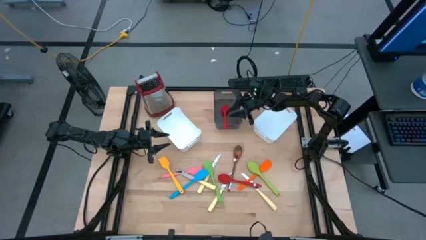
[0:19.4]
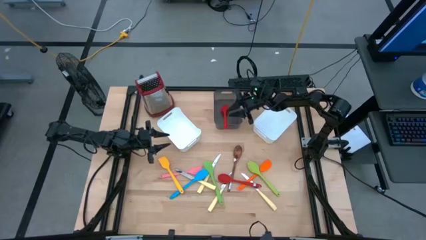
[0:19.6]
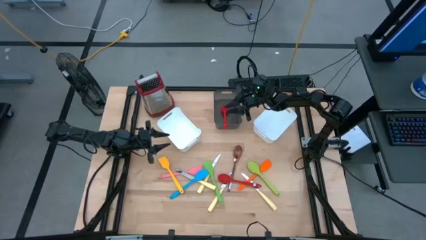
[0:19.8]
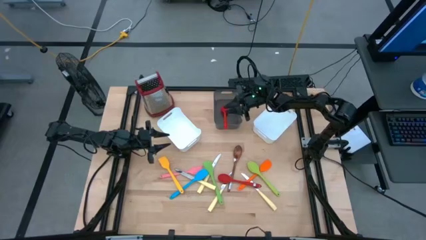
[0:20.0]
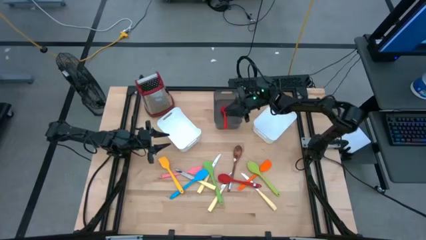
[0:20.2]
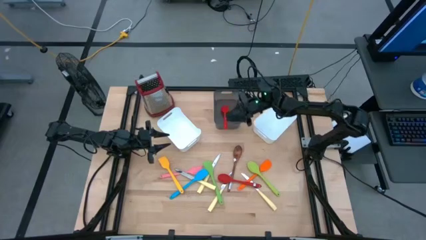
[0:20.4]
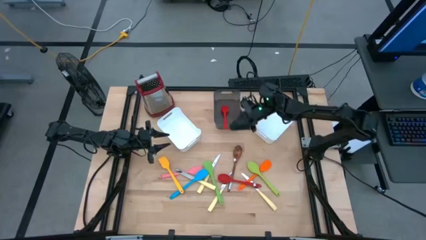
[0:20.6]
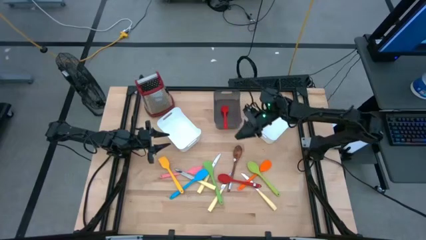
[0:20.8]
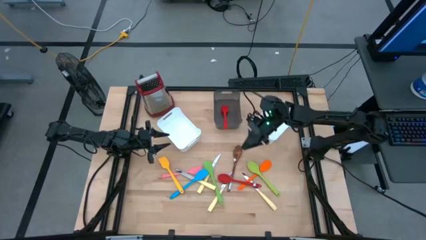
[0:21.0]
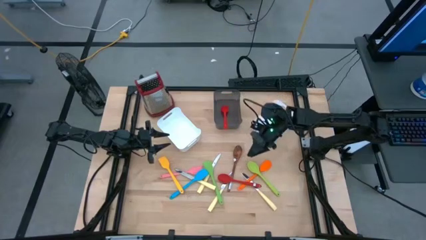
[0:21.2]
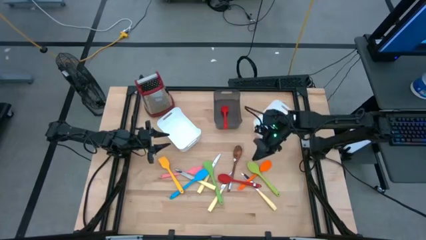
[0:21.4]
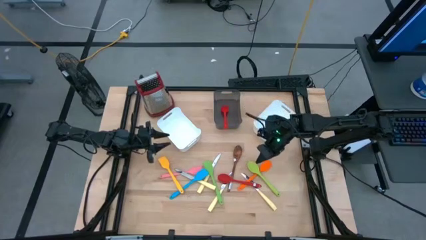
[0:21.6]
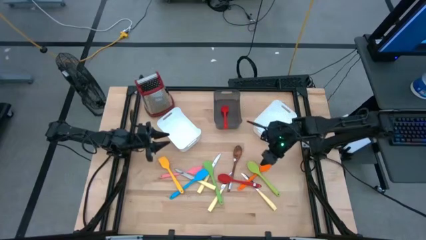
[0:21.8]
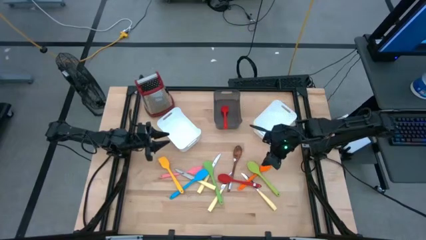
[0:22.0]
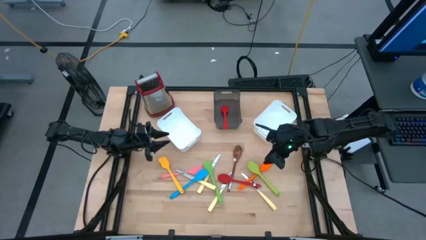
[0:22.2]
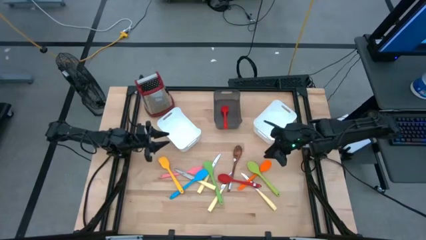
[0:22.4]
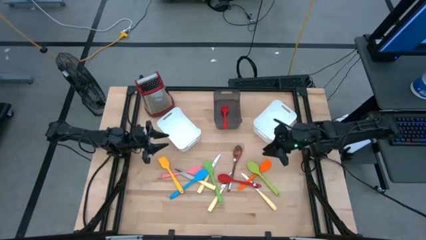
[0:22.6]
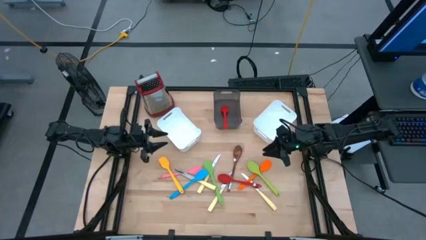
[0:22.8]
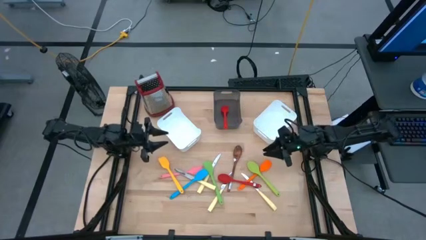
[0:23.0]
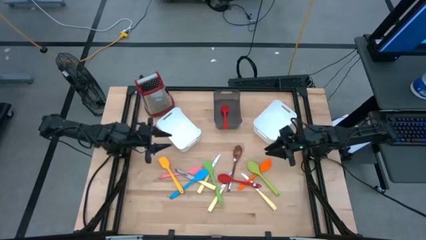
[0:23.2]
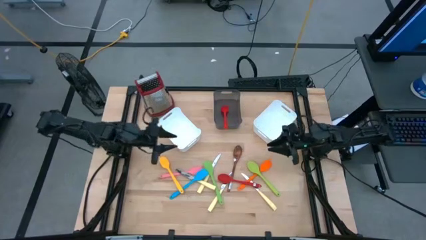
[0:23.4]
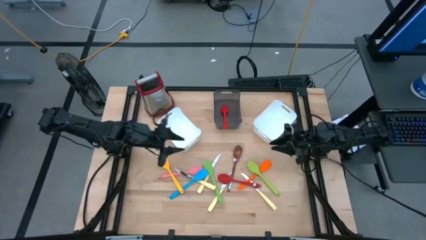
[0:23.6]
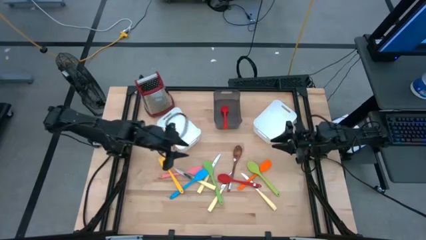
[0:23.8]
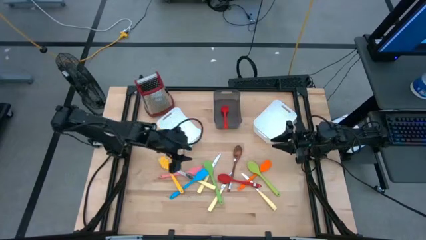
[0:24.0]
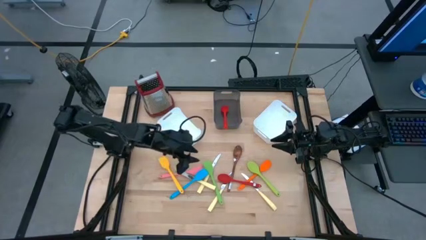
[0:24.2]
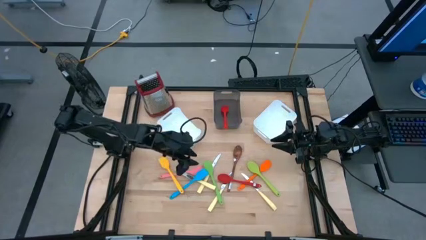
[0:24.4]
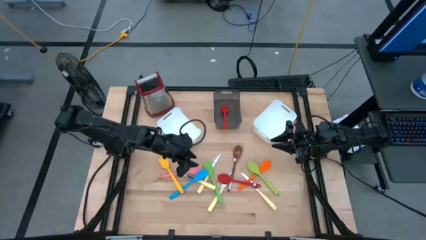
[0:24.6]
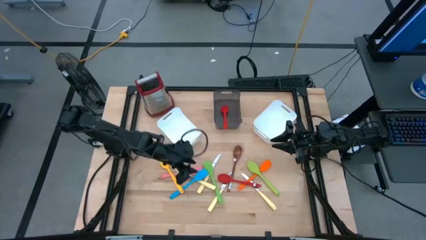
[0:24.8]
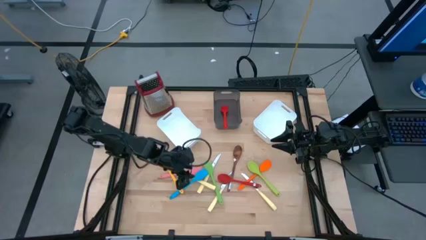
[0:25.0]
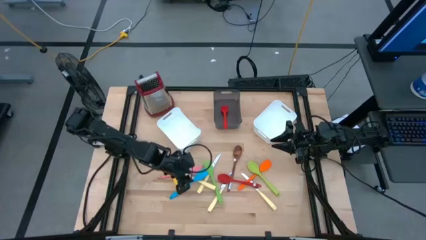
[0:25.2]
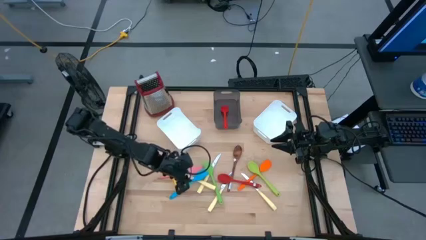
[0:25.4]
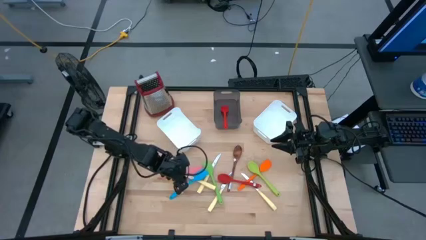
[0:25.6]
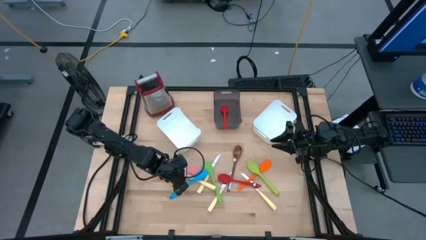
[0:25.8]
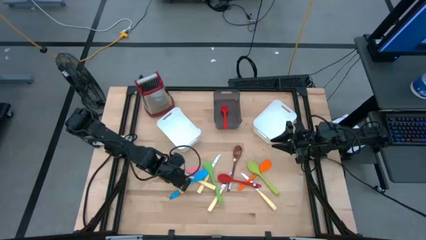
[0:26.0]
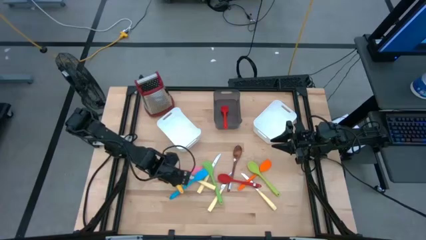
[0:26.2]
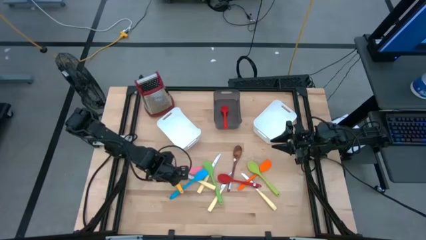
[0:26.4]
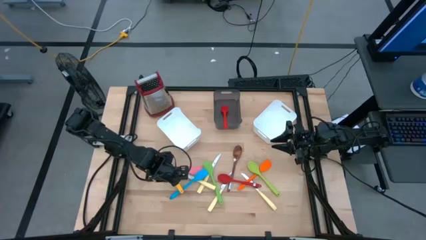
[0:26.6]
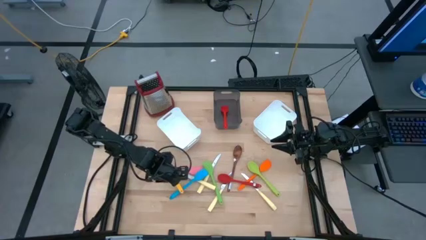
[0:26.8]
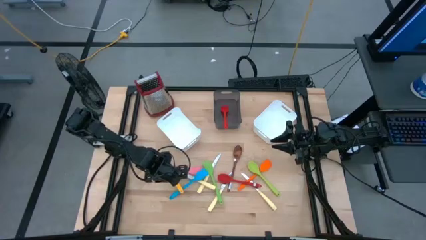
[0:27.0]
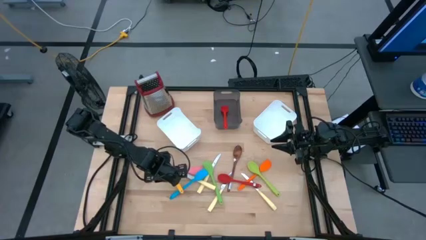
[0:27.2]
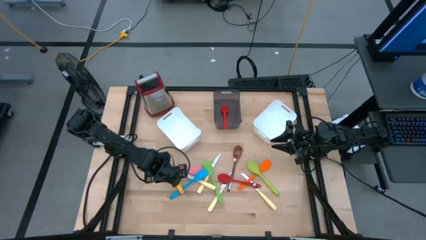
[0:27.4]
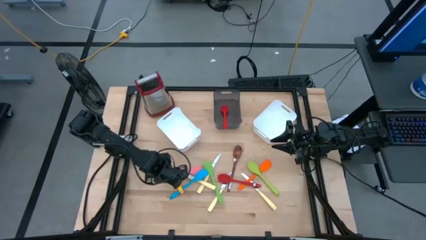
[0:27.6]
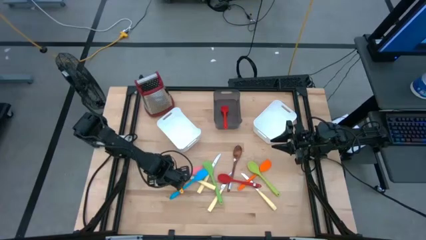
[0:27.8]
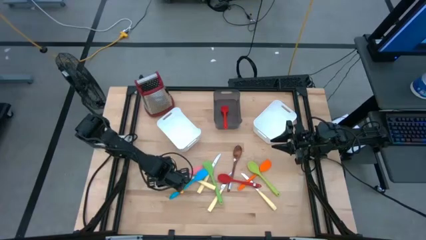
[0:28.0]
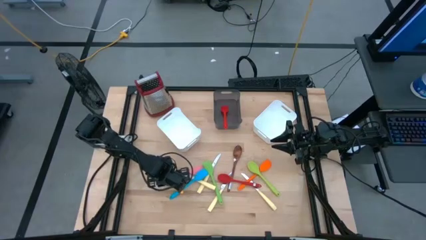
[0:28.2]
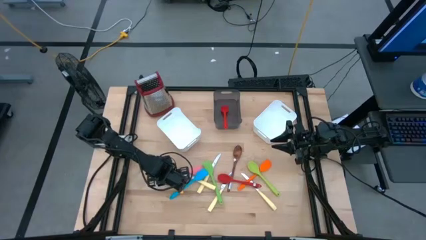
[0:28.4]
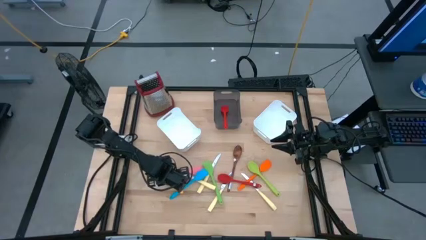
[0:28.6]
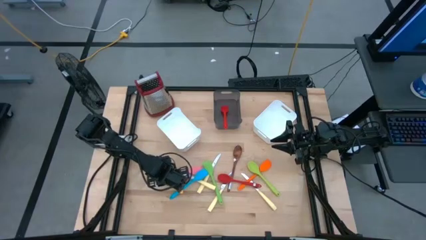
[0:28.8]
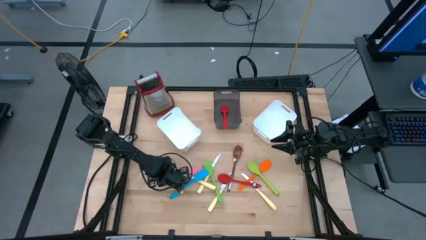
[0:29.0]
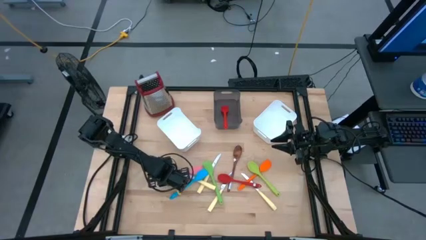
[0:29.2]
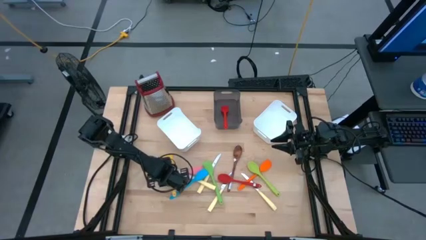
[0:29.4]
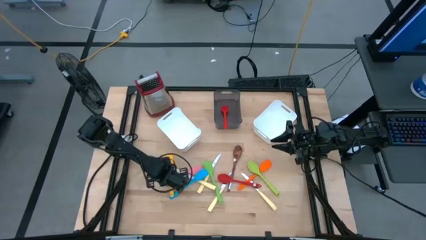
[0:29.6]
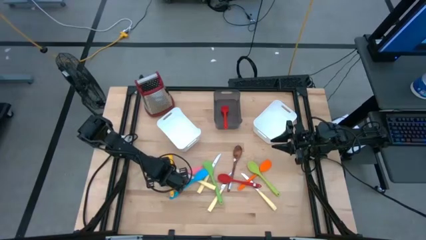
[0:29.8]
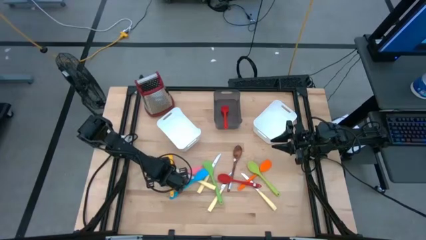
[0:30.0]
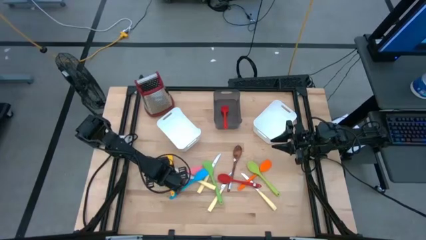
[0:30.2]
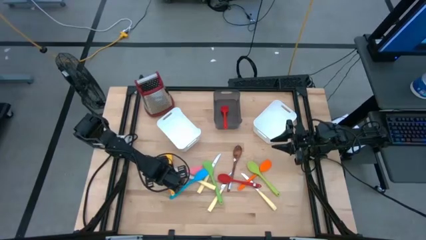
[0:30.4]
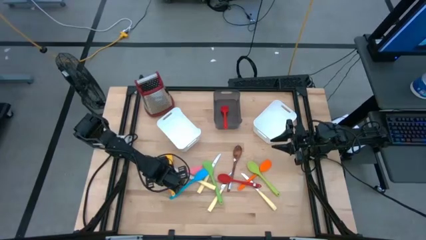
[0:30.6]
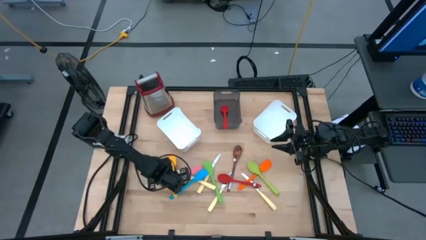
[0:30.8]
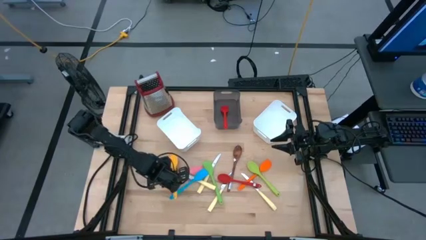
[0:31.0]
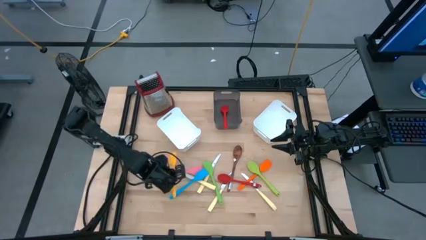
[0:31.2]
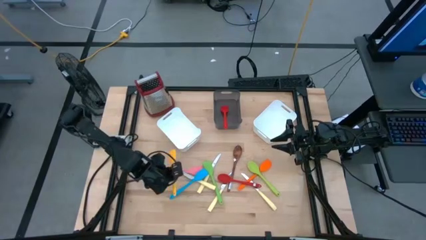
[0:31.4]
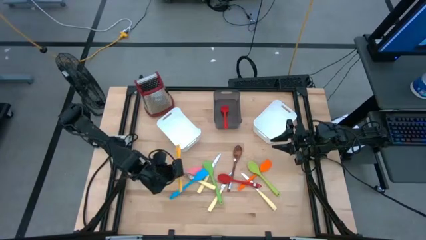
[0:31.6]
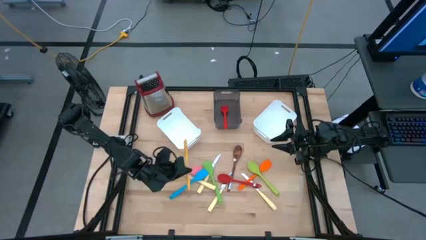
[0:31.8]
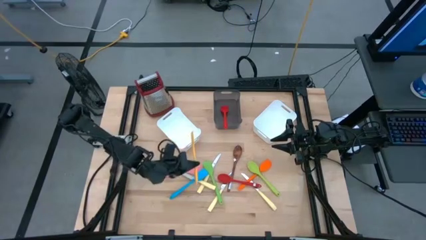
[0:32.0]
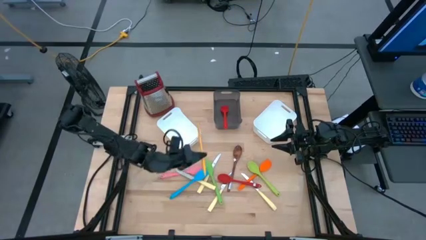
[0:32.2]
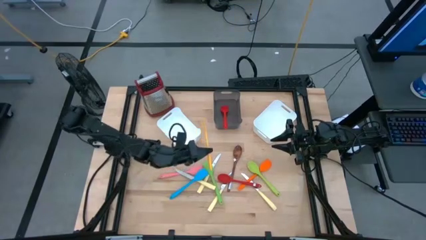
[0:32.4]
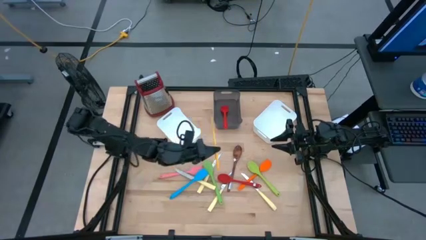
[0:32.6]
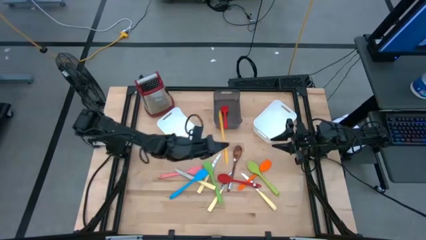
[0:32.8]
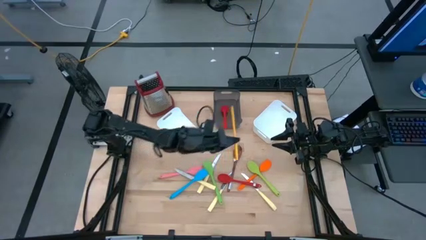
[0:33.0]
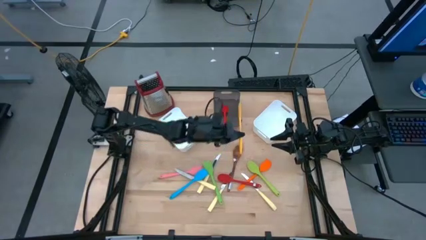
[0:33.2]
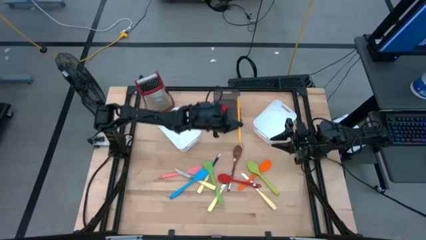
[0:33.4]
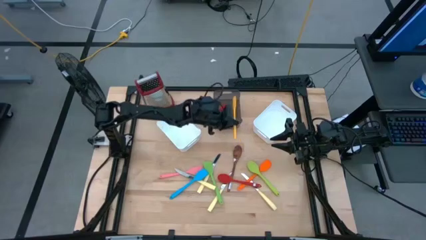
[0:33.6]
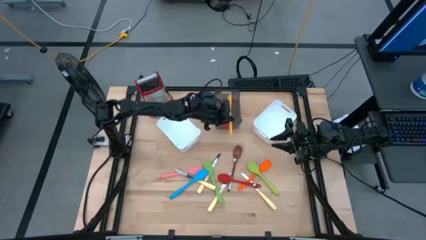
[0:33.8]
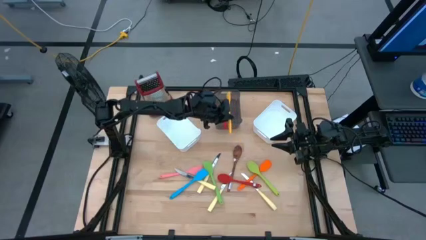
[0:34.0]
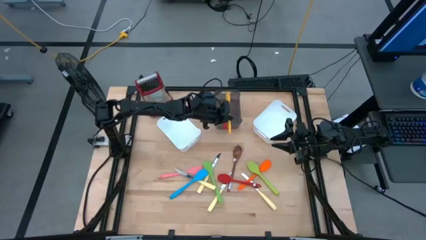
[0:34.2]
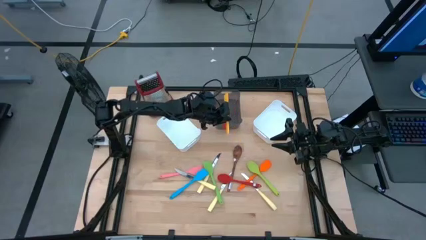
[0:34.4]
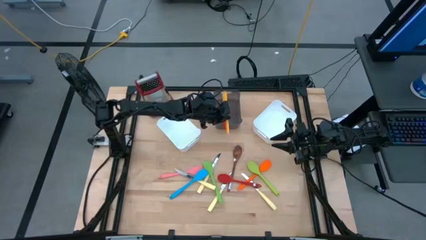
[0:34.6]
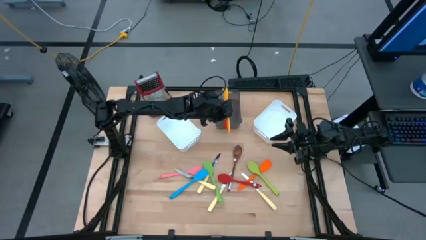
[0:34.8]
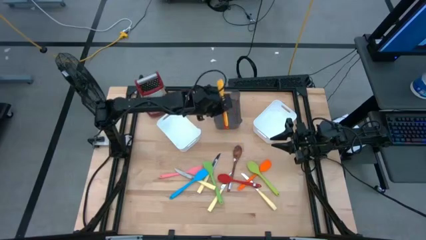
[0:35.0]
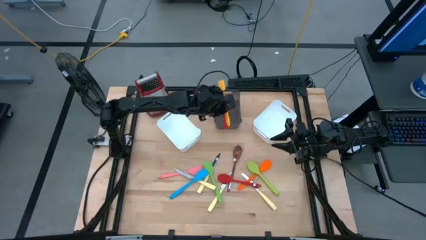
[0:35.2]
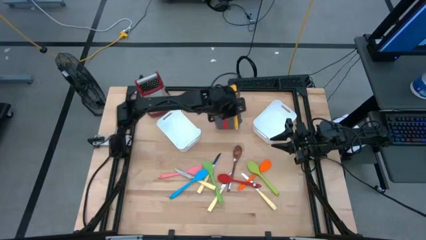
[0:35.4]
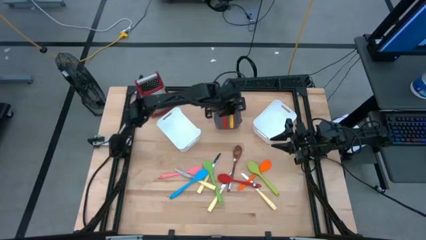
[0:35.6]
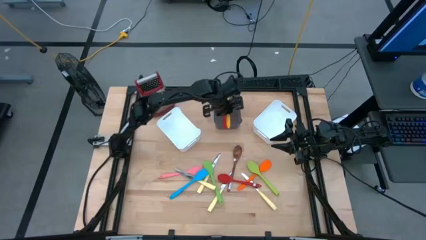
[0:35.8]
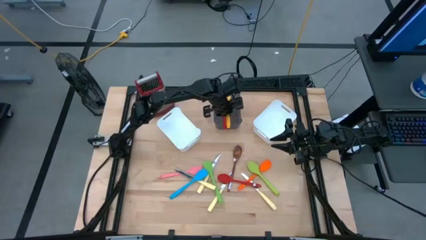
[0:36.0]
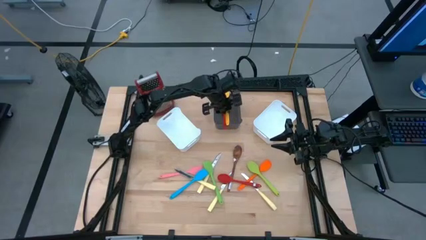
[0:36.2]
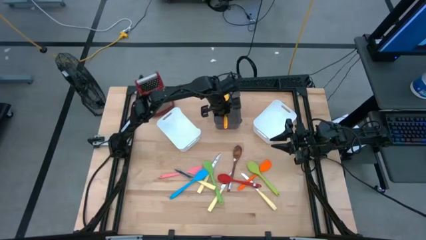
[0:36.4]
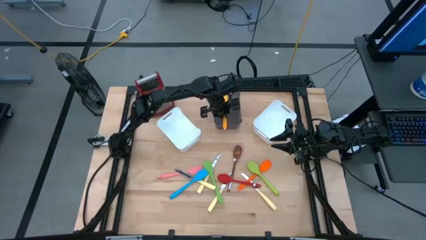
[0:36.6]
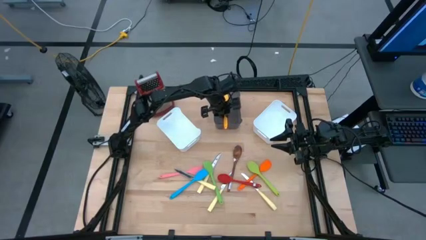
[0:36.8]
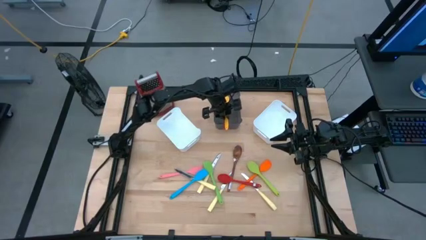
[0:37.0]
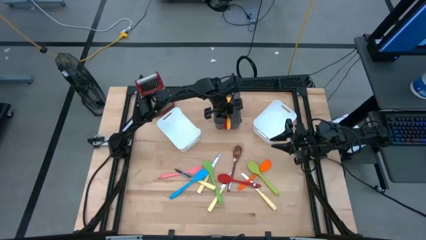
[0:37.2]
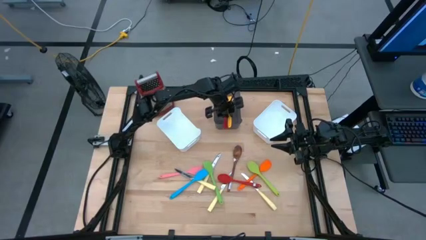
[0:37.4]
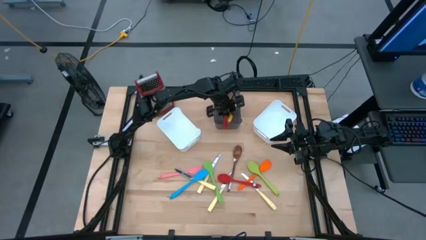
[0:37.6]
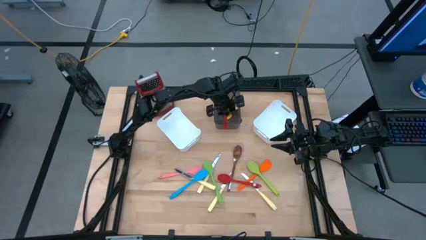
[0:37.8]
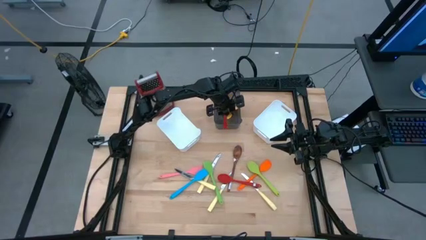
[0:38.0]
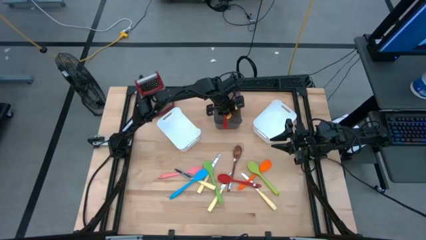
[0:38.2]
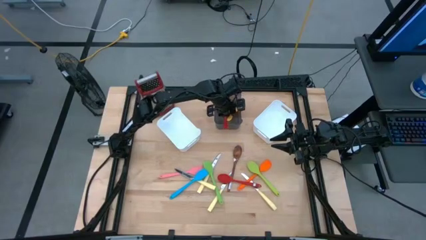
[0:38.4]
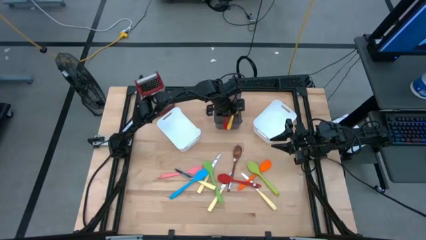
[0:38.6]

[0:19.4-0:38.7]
Task: Pick & Place Kitchen Items
Put the yellow spatula into the black bin
